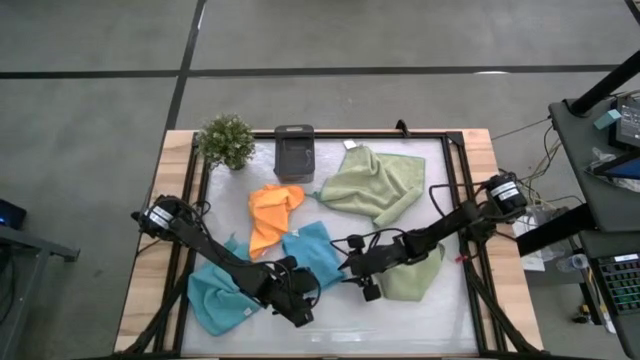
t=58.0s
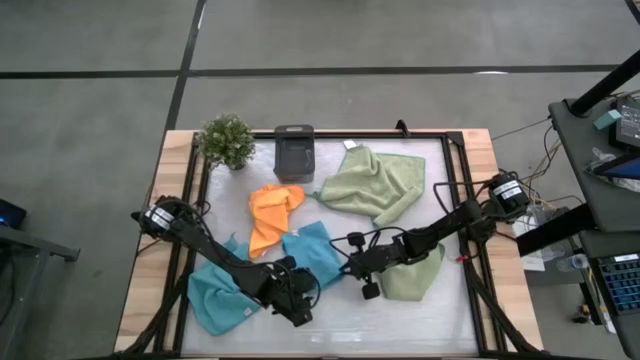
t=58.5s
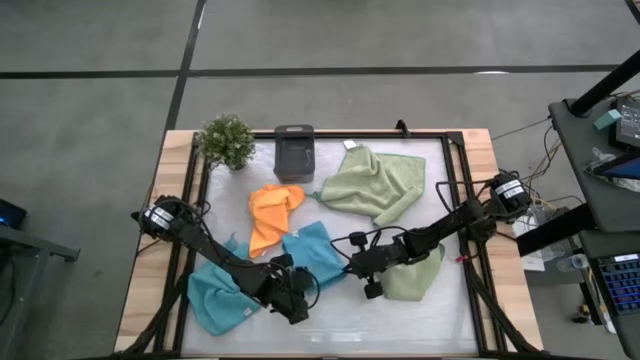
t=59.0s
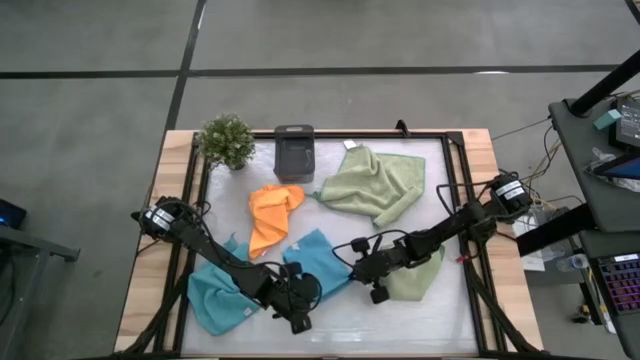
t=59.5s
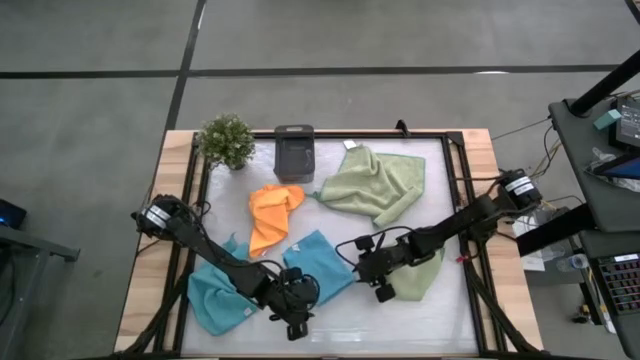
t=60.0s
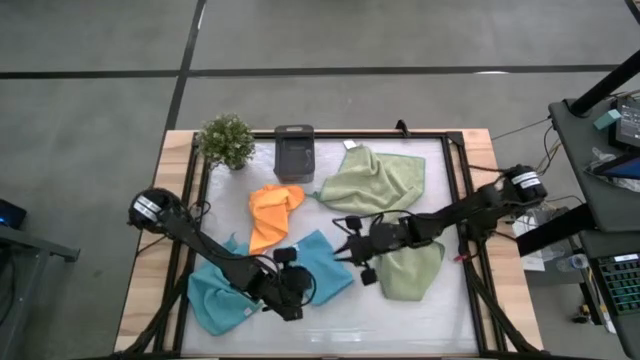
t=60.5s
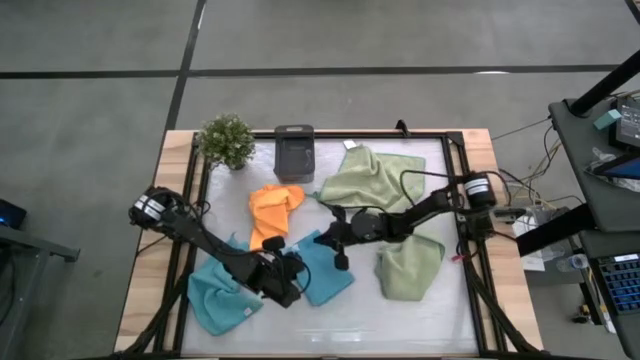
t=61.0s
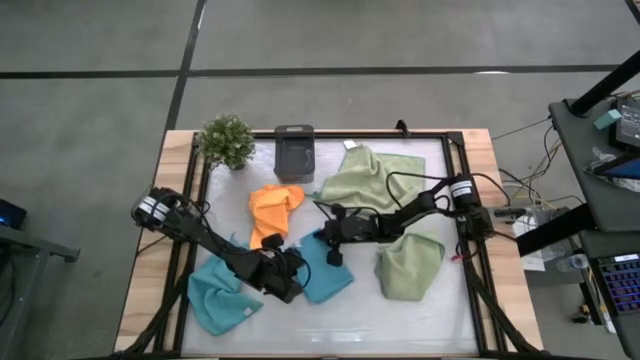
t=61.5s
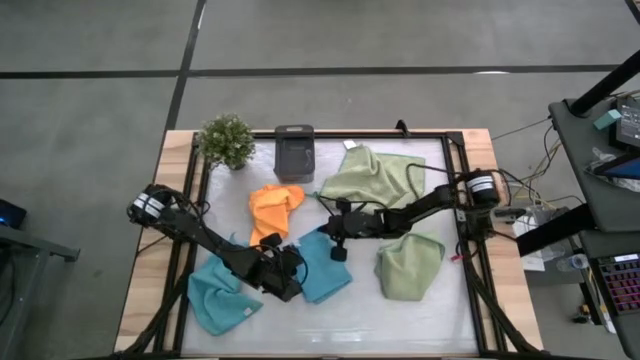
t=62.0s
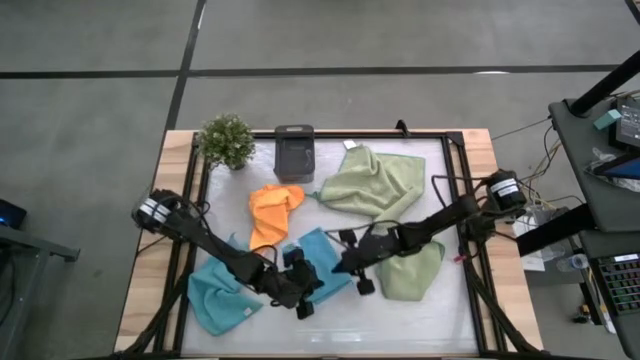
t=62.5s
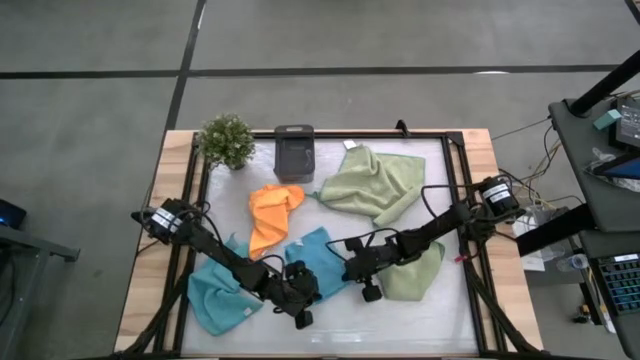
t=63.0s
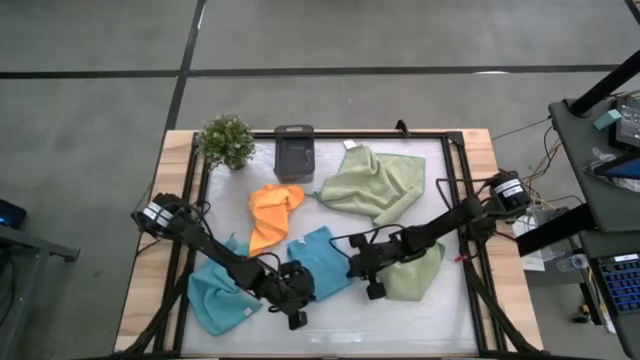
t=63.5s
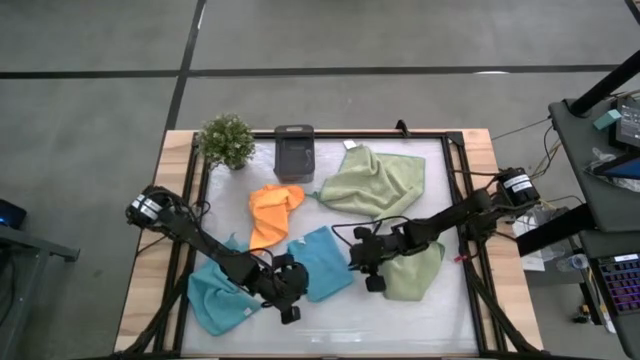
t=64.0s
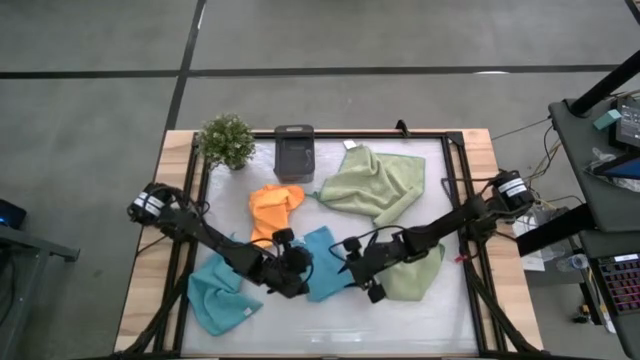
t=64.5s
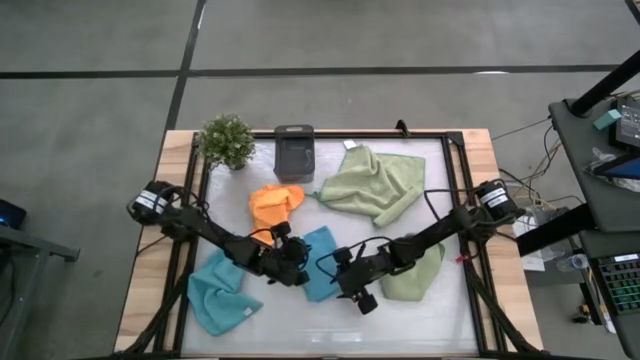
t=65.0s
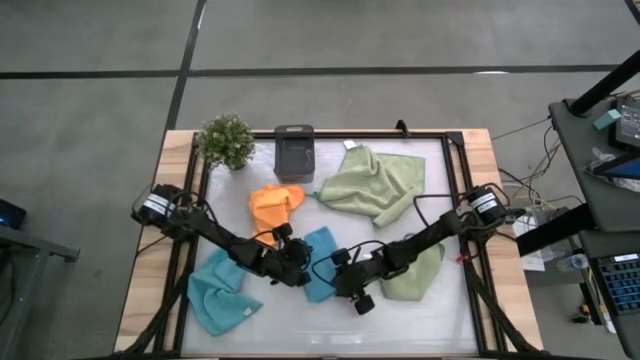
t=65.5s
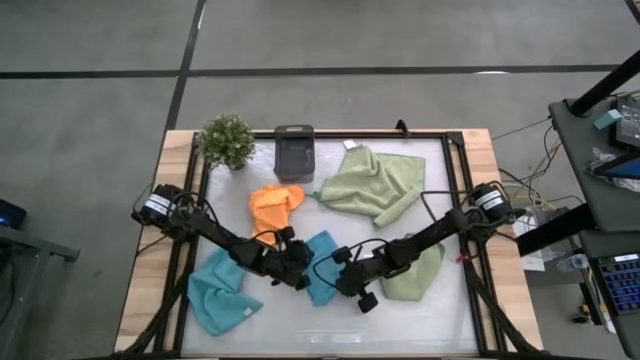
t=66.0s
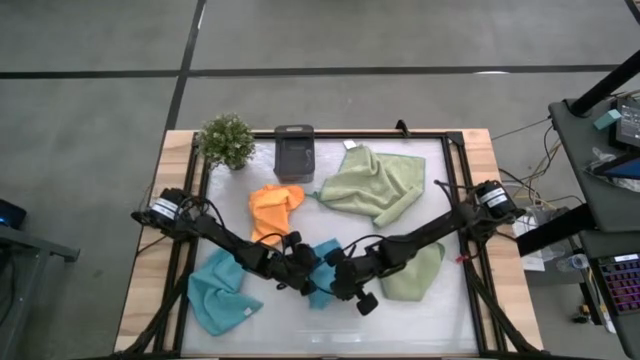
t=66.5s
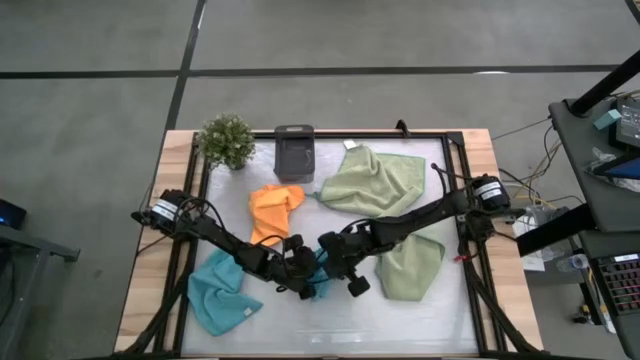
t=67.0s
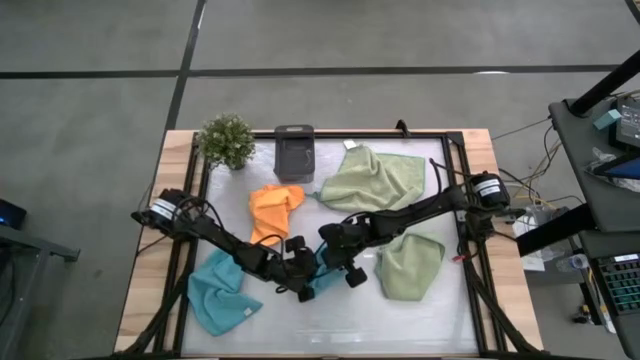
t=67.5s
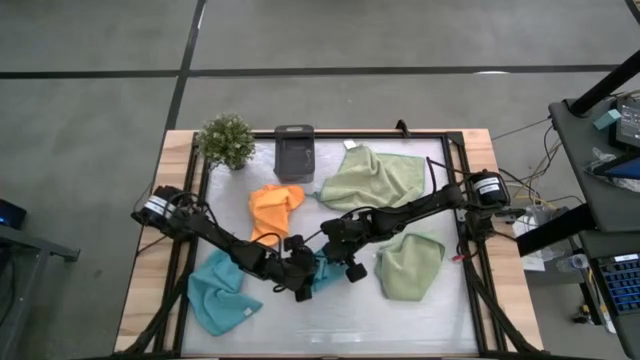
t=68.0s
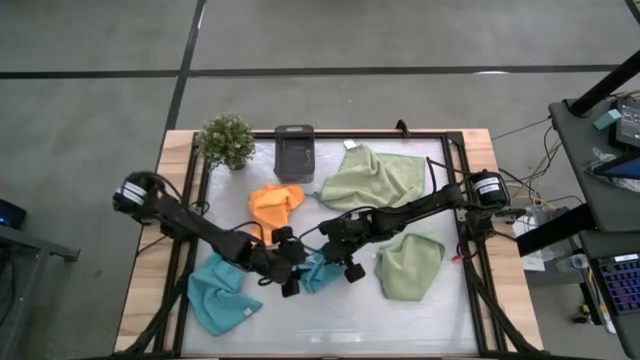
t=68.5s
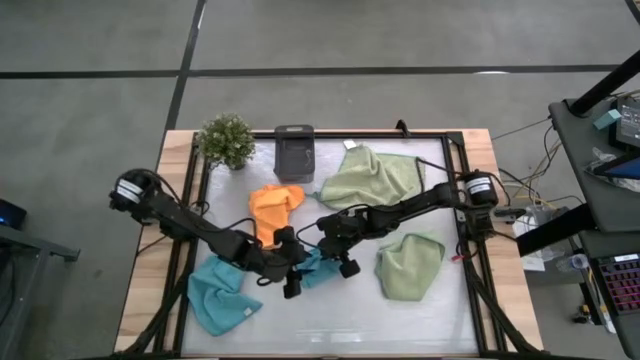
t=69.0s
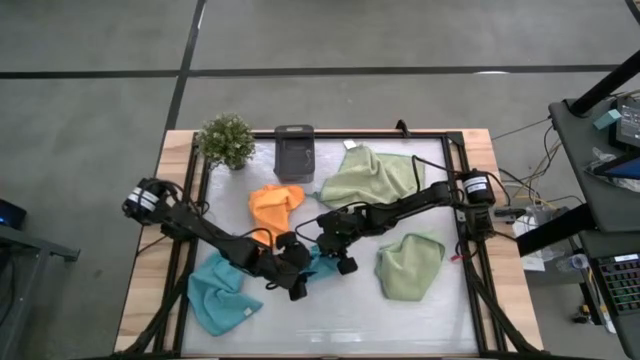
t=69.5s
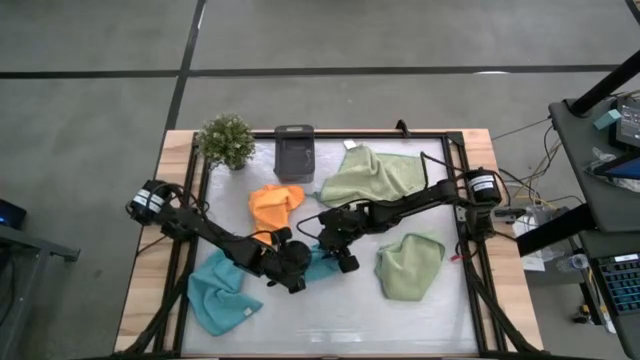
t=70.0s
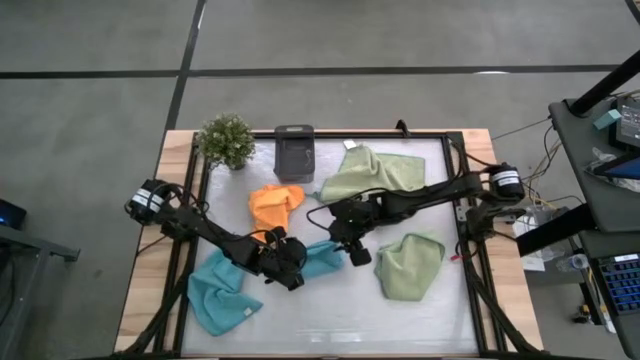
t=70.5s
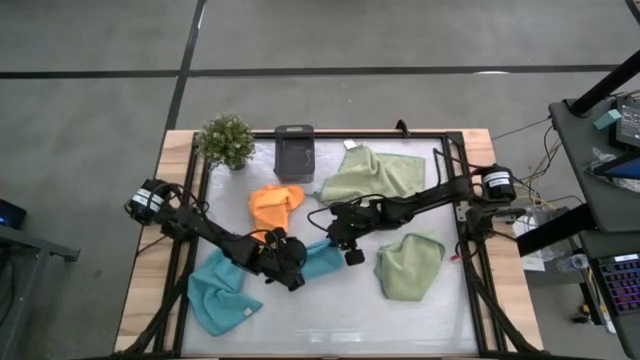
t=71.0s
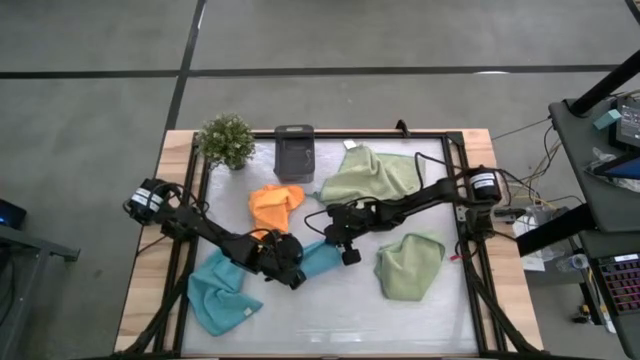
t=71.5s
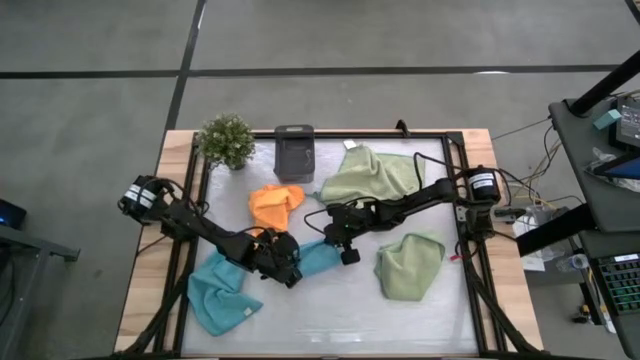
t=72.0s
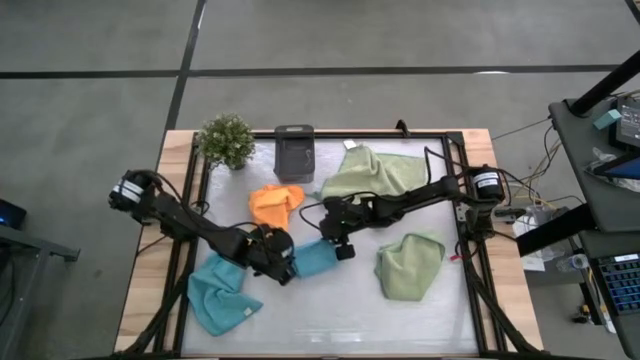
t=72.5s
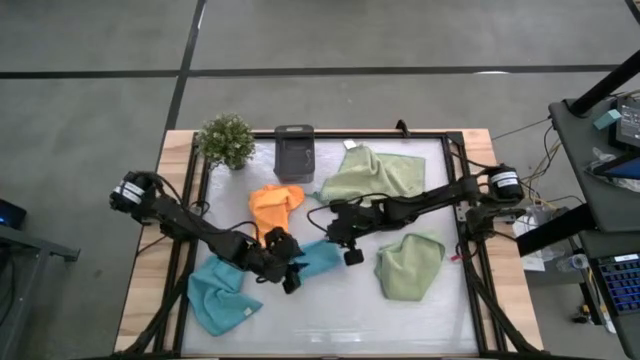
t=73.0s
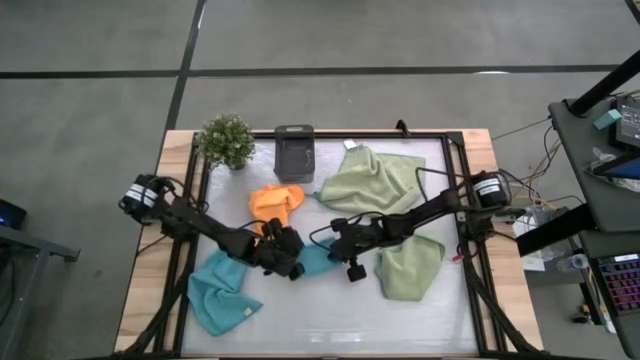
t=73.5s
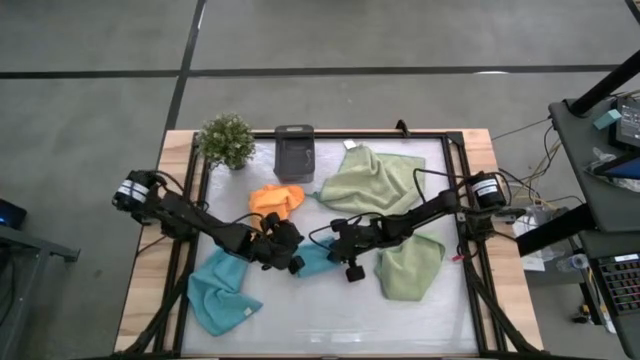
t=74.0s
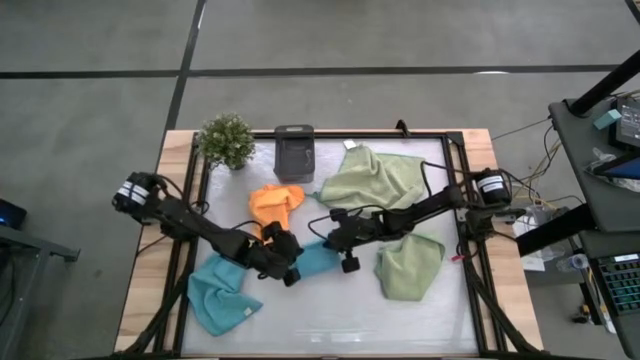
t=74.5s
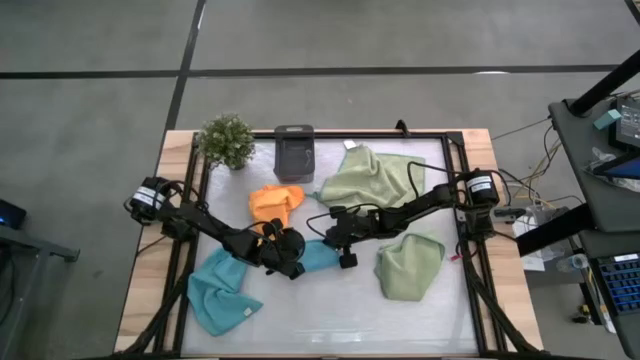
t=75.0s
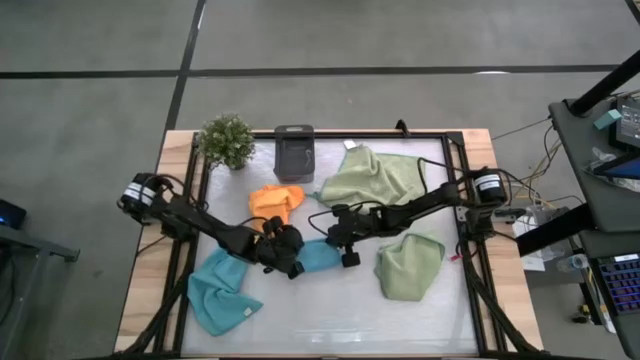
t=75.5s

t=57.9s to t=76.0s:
Task: Fold microfiber towels
Fold the right blue towel
